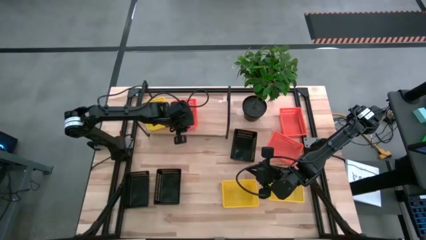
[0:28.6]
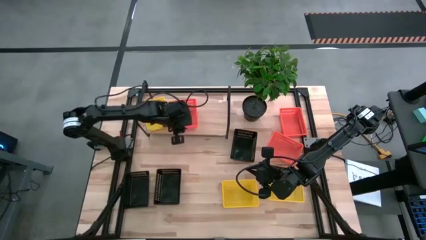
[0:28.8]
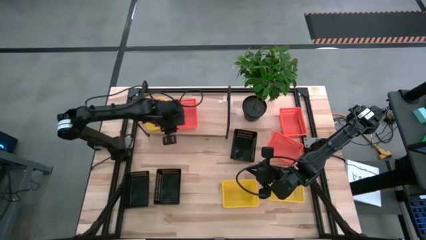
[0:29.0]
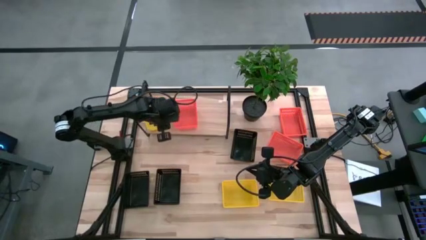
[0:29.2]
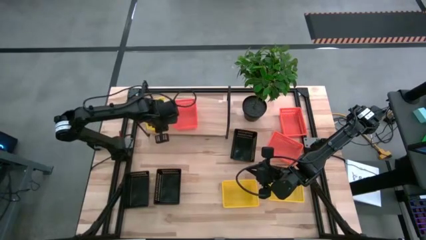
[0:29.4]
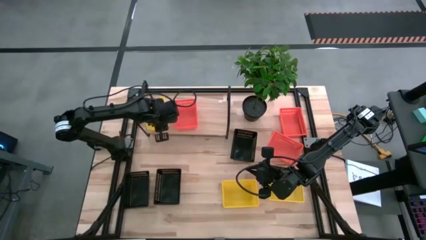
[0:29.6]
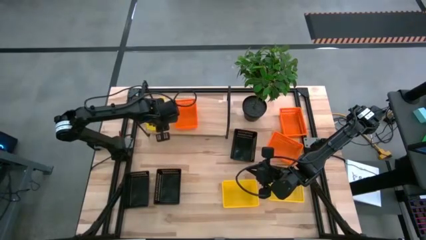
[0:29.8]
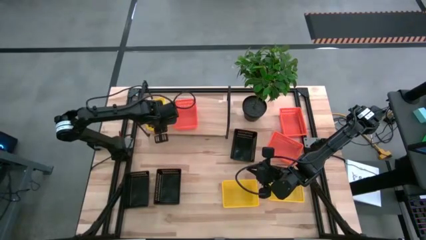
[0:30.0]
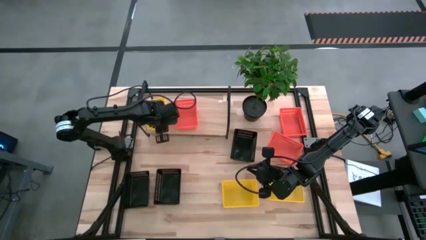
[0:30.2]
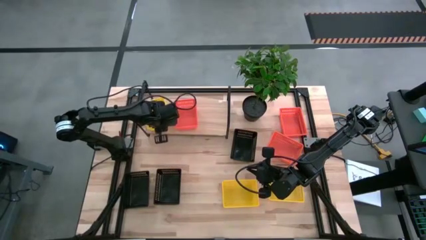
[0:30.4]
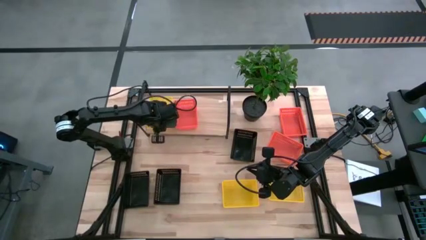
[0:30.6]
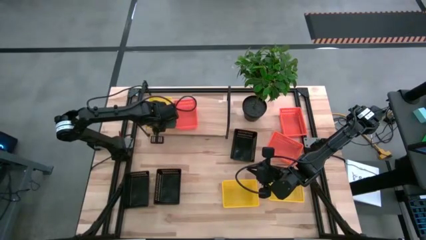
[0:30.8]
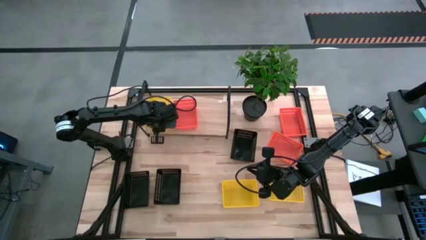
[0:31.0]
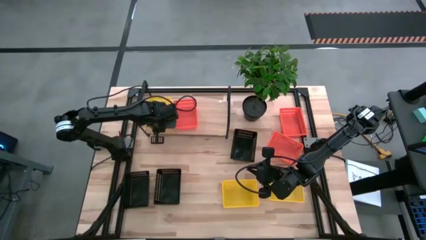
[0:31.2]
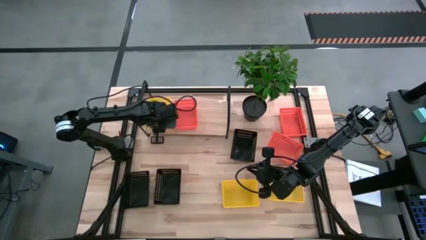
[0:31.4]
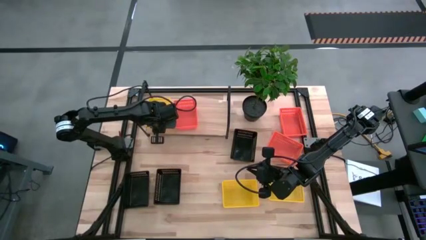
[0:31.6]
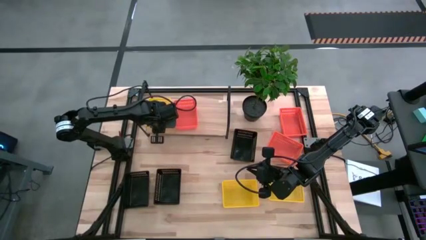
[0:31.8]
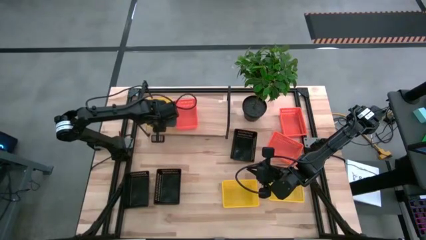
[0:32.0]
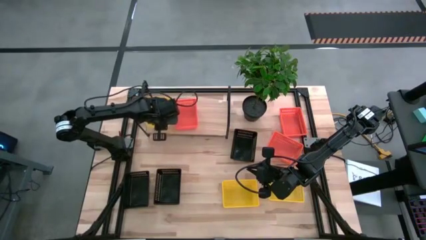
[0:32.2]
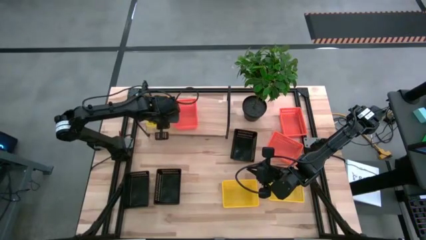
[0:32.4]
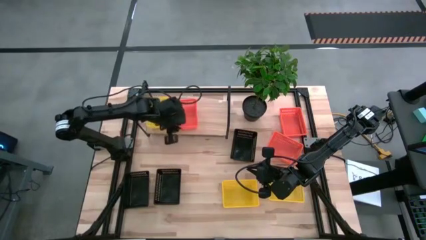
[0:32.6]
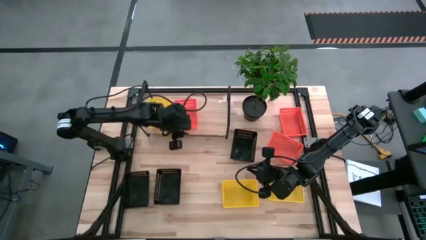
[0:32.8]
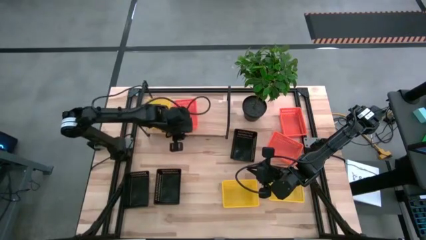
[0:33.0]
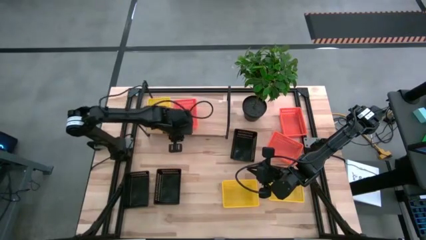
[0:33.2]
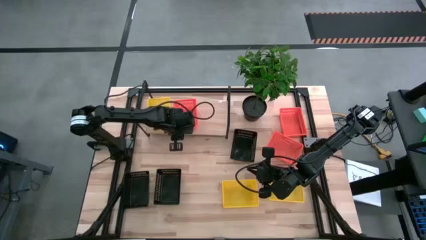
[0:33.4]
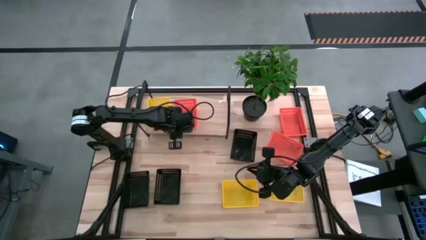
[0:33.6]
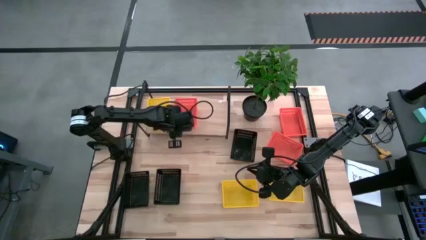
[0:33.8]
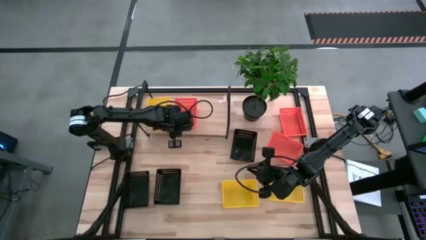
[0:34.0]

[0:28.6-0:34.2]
Task: Stack baskets on shelf by color
Adjust the baskets on the shelf

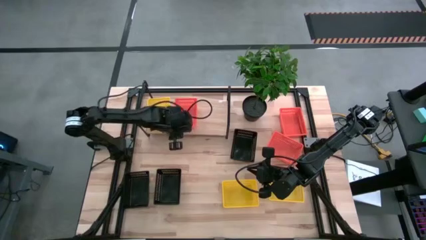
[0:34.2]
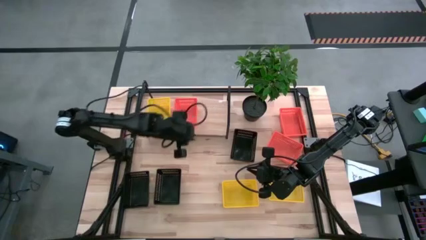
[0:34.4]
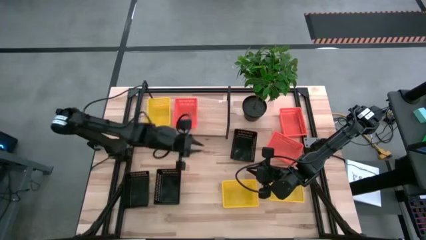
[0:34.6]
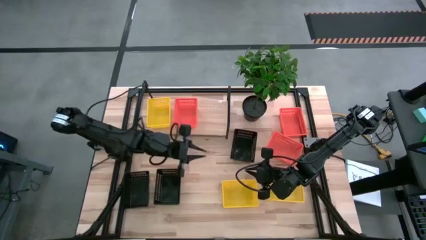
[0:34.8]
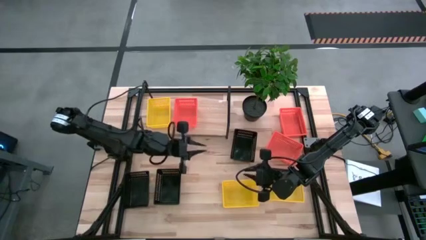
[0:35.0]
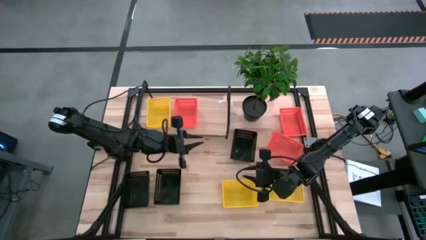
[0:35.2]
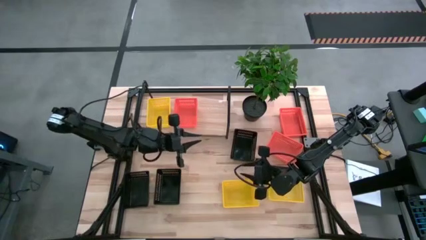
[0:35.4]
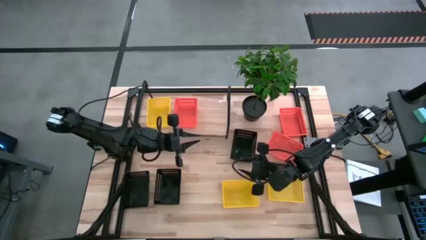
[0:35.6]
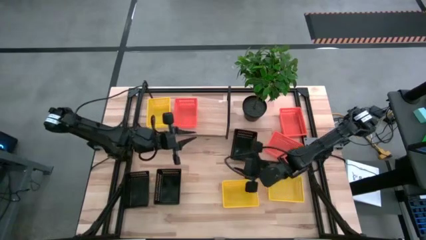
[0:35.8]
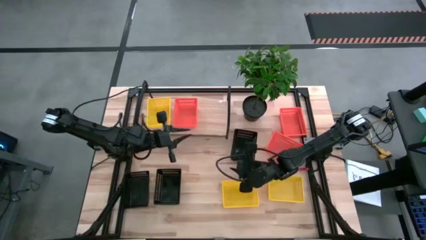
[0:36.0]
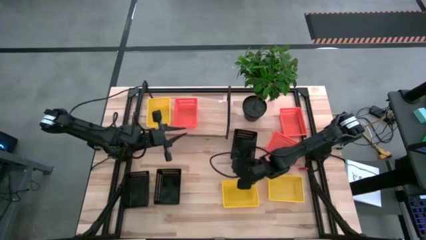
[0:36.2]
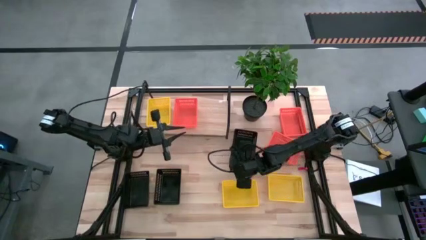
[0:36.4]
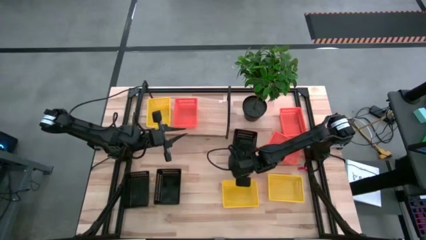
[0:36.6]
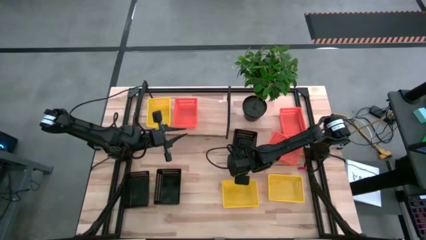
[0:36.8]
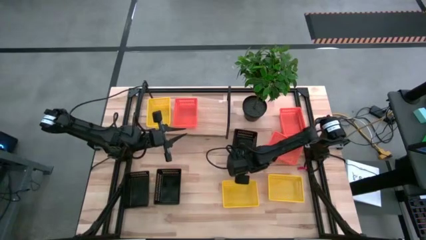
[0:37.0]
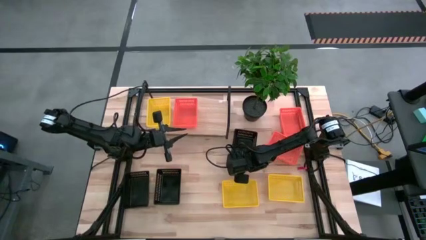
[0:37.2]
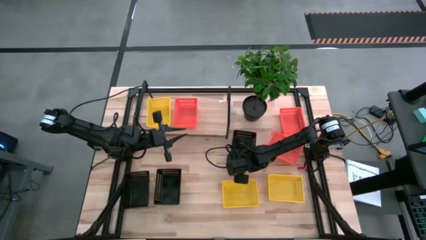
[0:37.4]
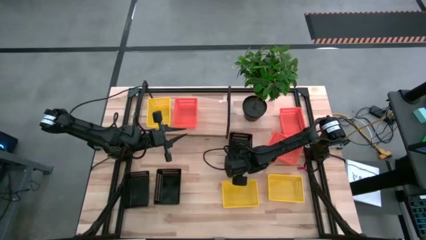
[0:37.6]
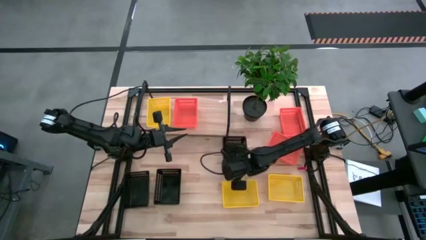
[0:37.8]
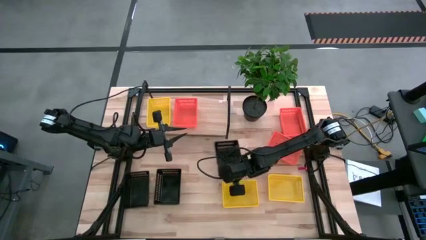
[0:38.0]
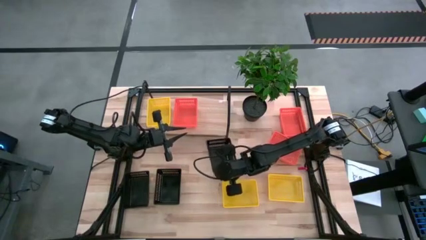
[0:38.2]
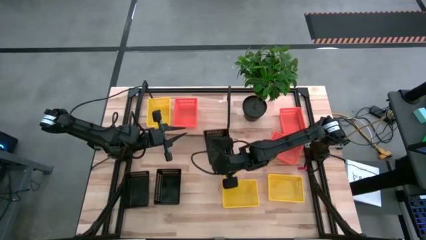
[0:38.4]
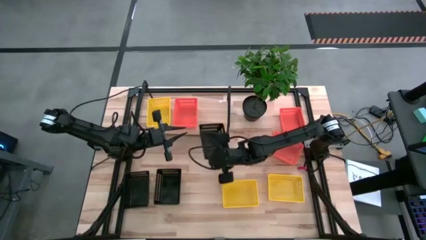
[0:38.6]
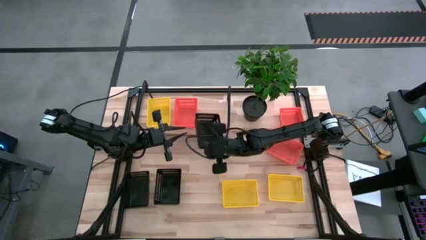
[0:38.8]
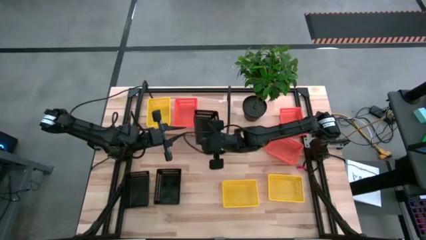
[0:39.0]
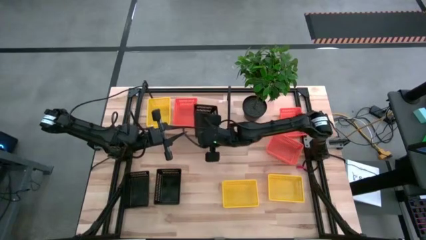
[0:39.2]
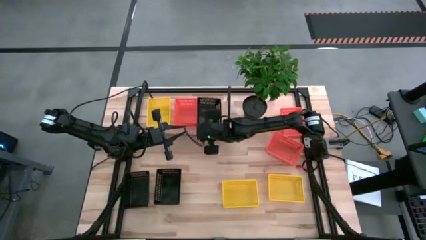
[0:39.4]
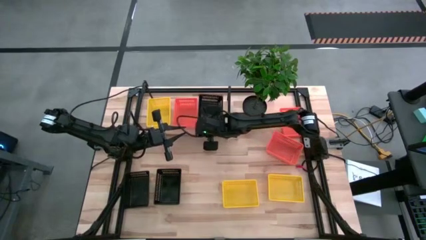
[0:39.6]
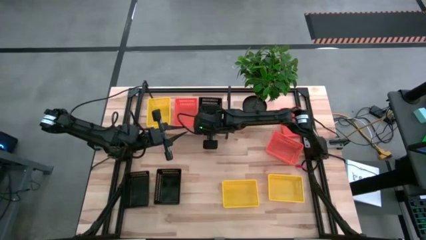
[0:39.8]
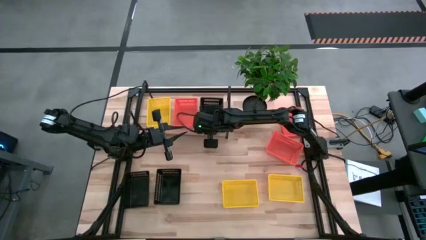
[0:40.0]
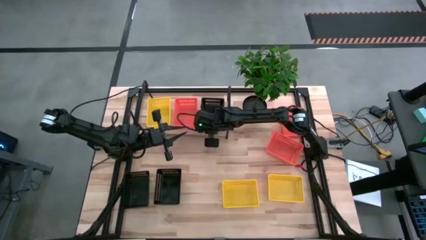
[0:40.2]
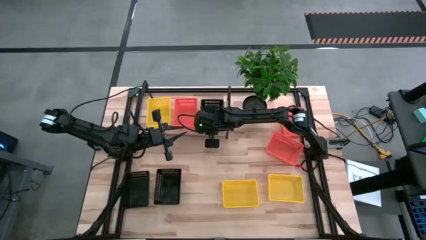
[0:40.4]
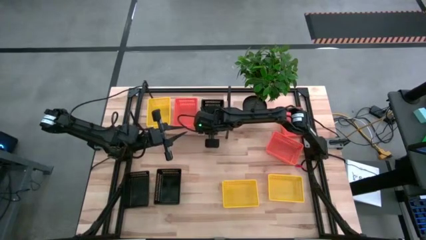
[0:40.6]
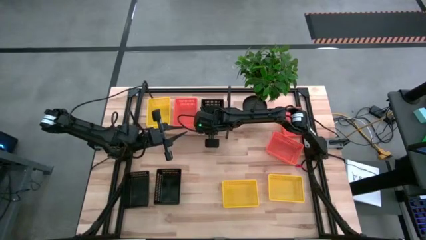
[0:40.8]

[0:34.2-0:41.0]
Put the top right black basket on the shelf
